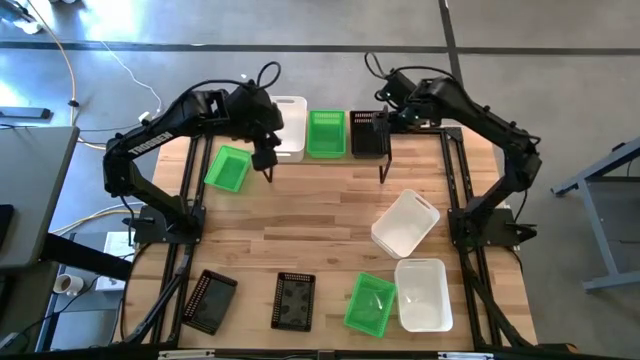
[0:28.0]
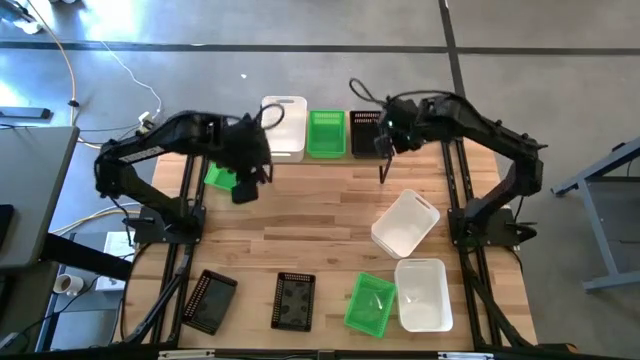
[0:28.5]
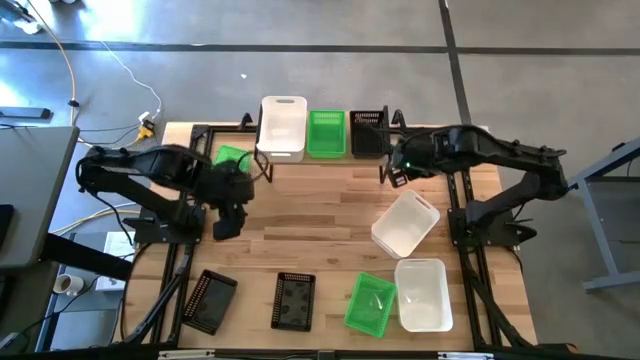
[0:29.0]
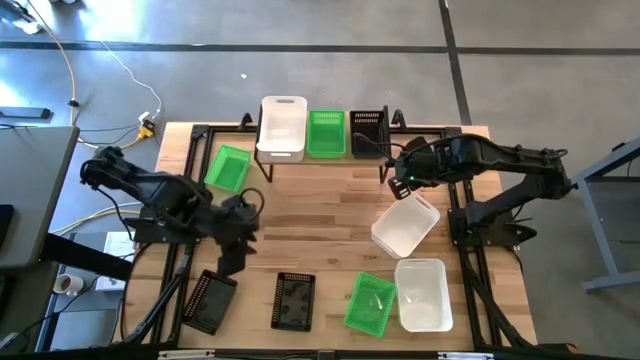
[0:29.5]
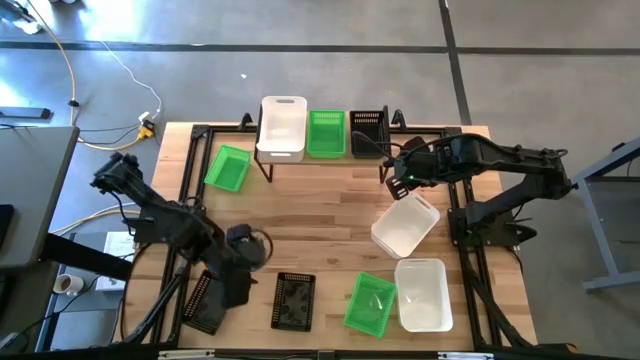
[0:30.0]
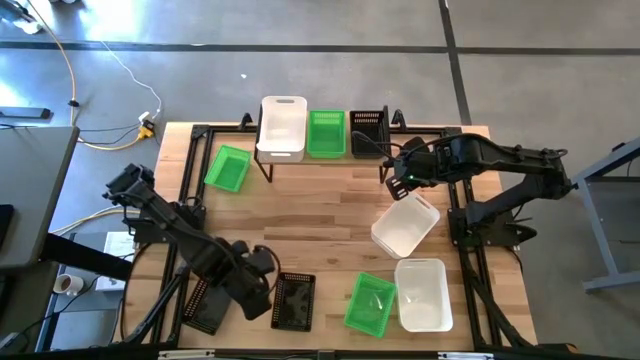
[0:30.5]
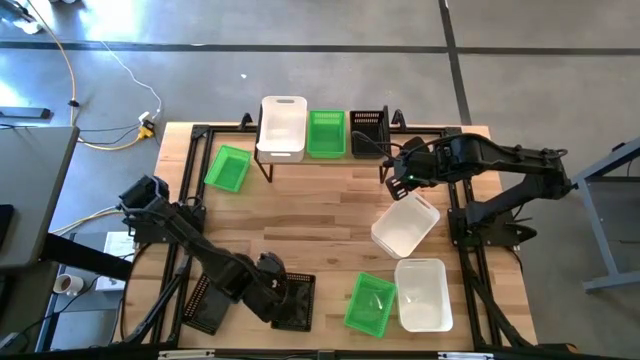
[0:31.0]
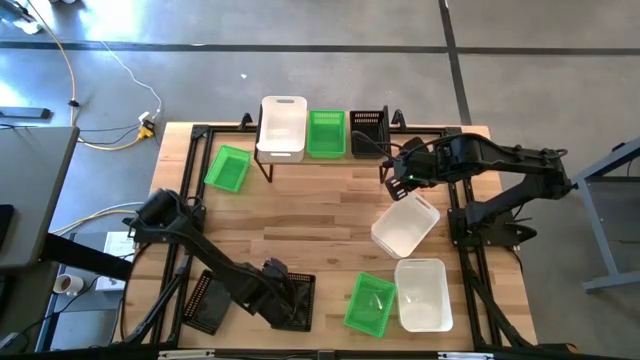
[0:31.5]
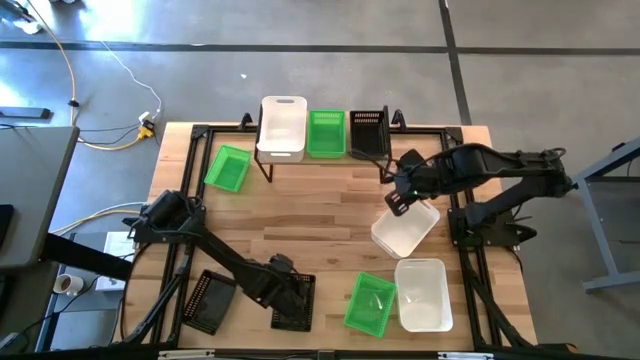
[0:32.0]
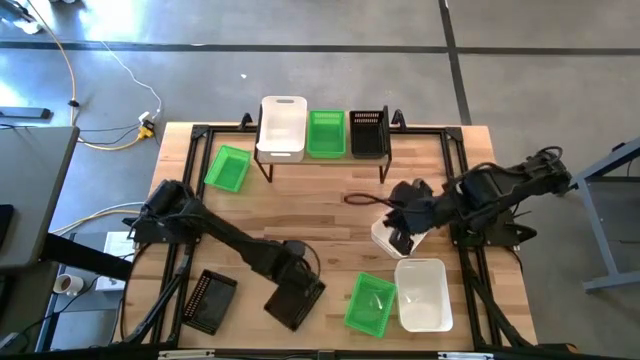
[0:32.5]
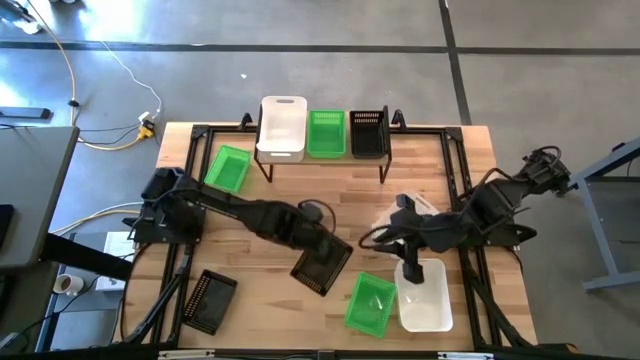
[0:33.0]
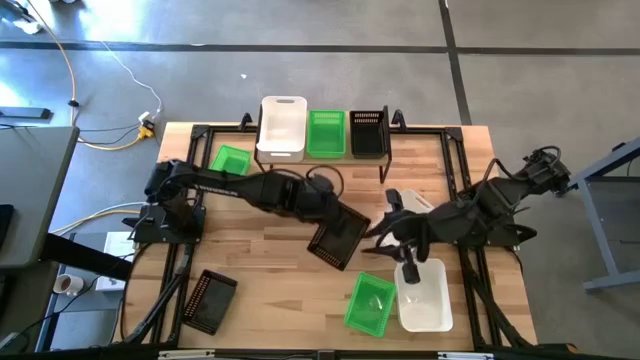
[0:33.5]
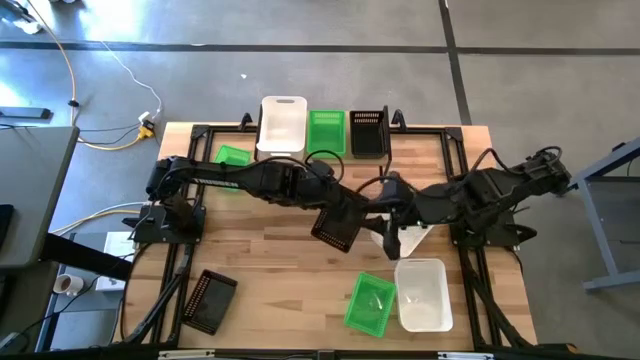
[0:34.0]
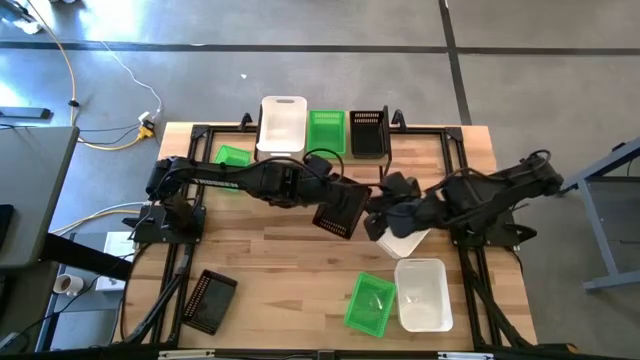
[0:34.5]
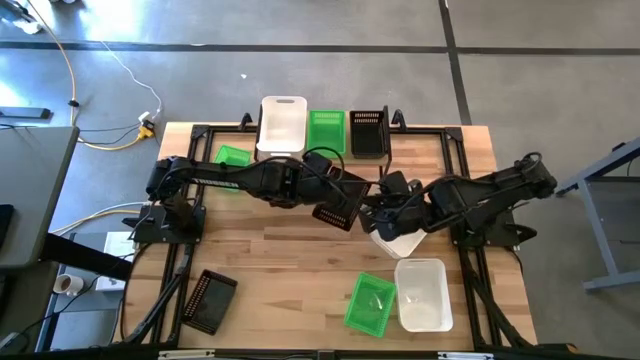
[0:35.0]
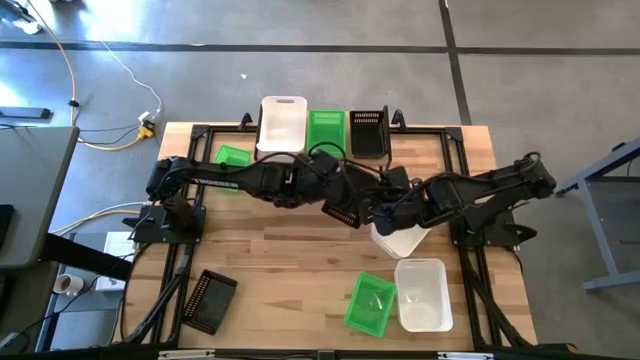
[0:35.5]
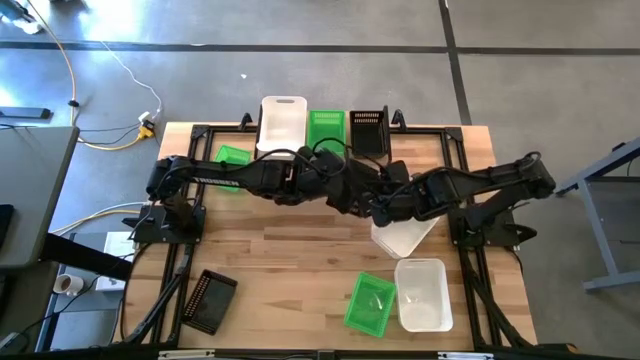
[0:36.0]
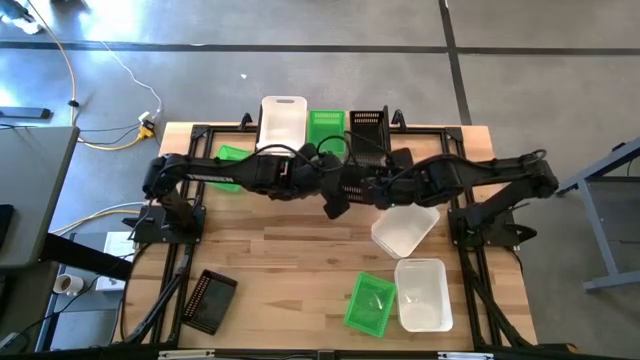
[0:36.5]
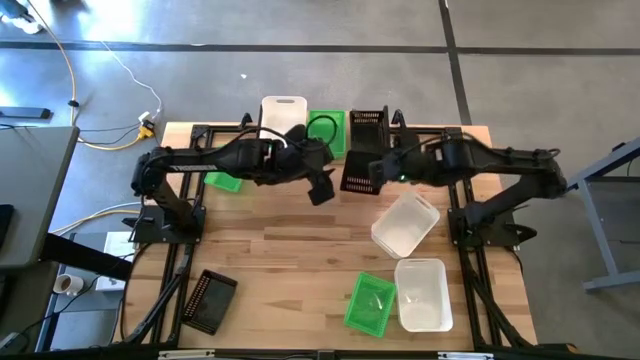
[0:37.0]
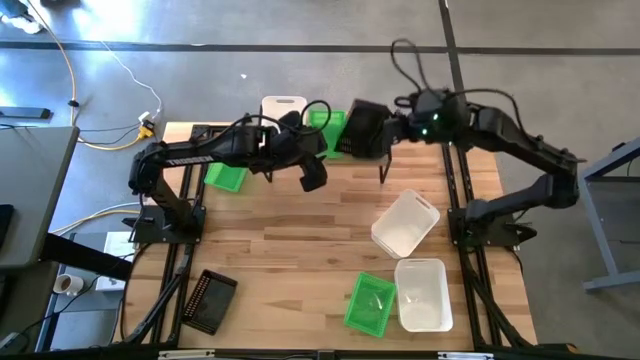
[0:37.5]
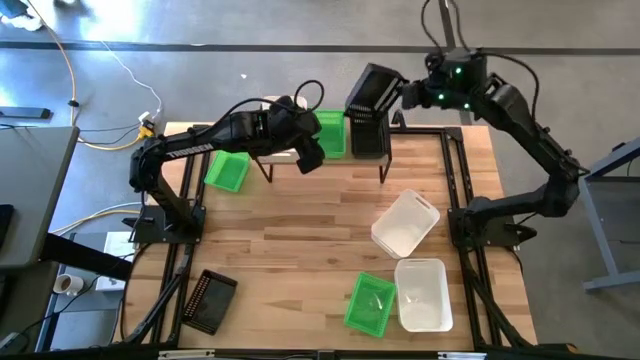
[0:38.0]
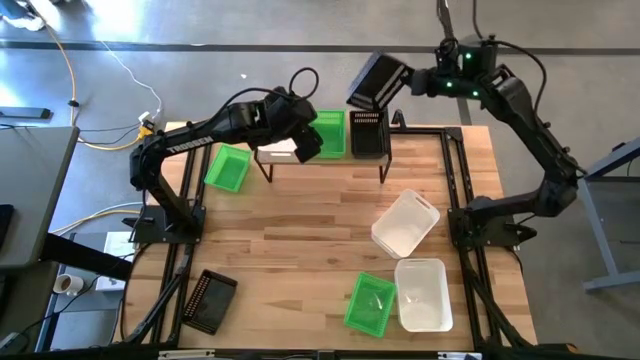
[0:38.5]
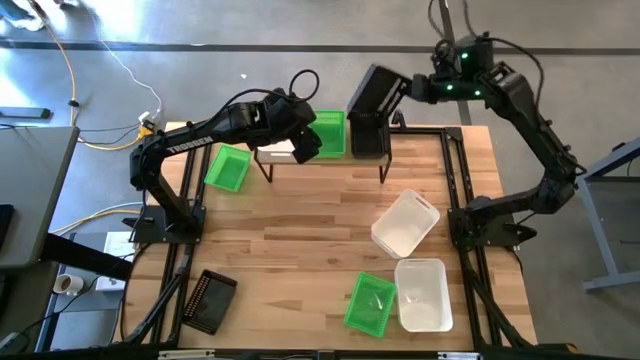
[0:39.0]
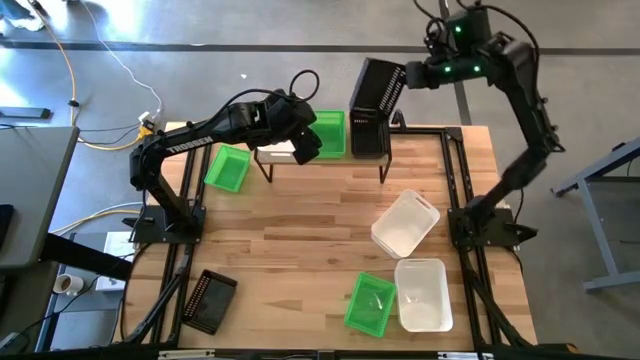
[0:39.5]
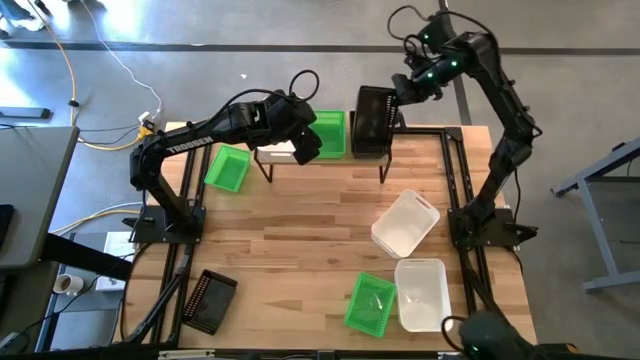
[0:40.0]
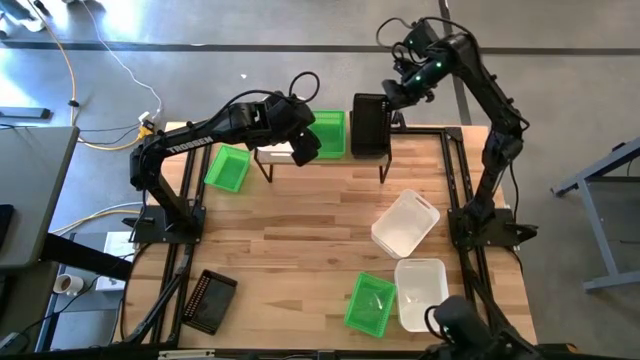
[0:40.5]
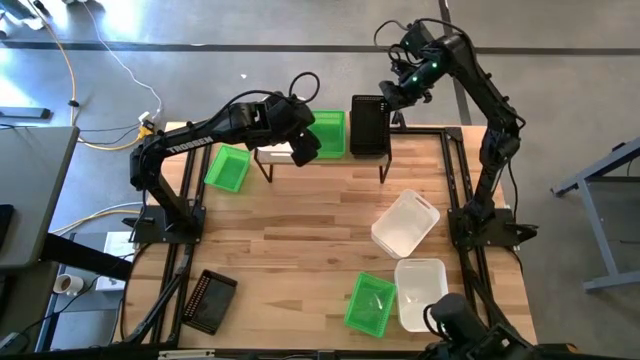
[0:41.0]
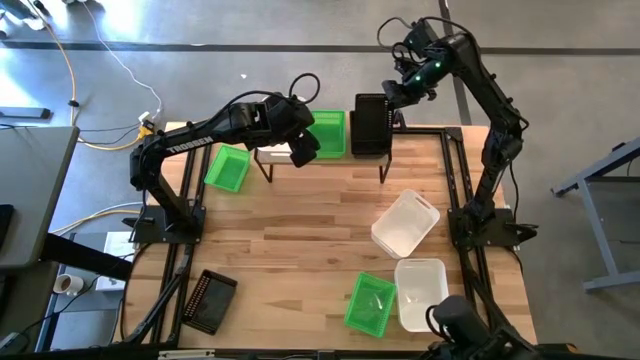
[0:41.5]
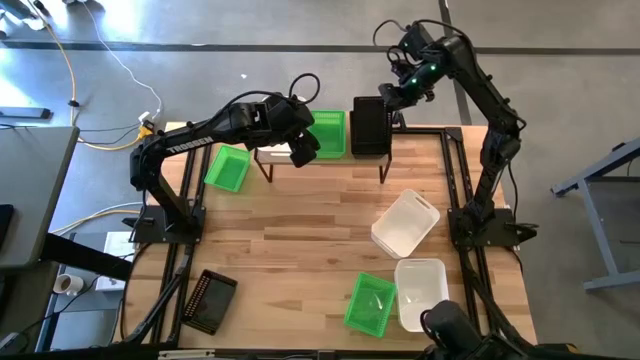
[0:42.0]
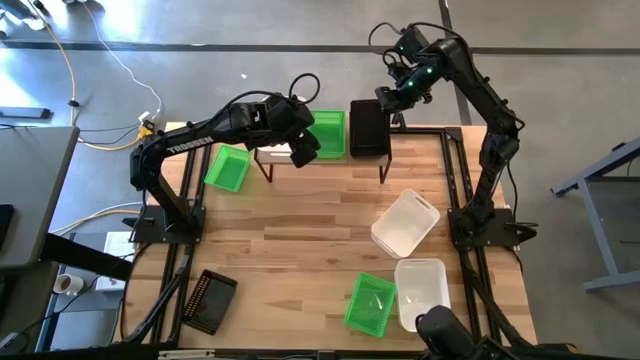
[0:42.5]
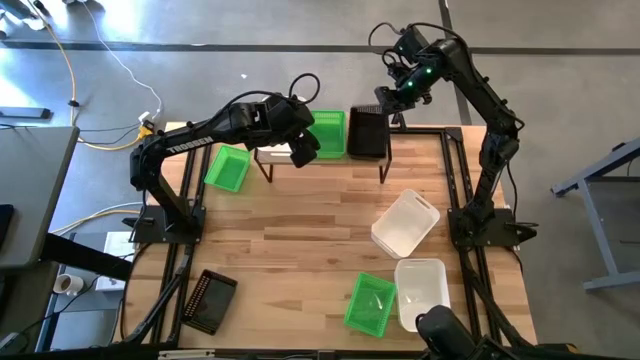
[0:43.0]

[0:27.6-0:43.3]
Task: Stack baskets on shelf by color
Stack the right black bin on top of the black bin

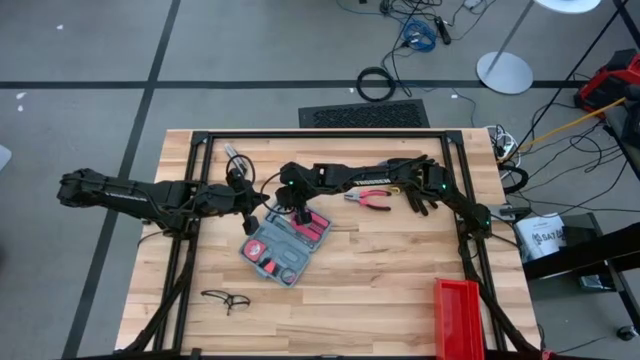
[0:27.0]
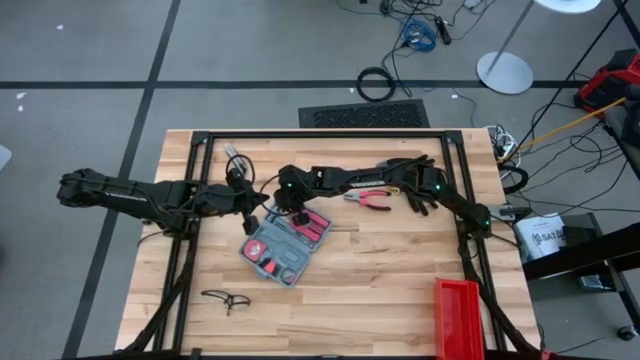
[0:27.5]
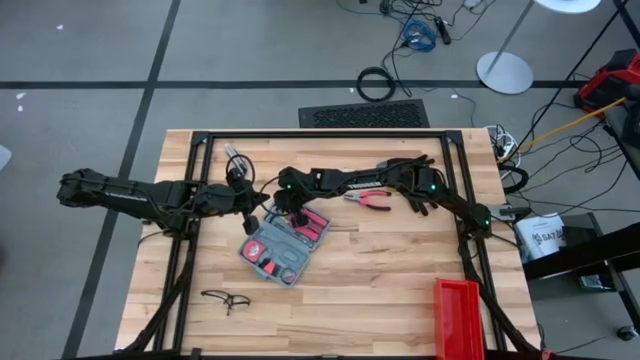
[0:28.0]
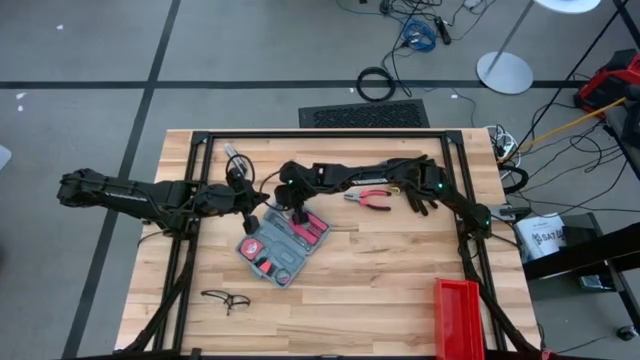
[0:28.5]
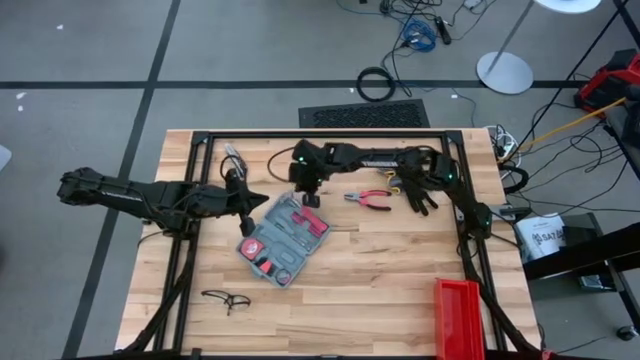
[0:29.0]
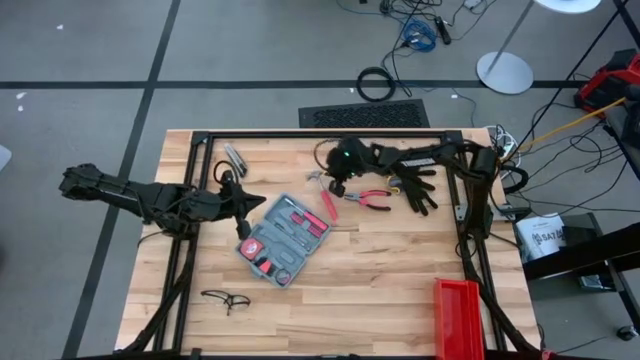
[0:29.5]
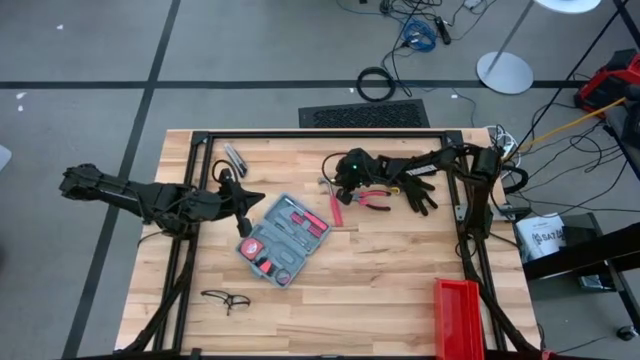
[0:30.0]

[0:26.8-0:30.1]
Task: prefit tool cases
Remove the pink hammer from the gray prefit tool case

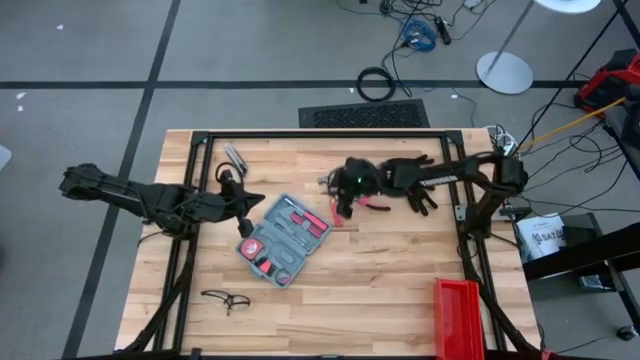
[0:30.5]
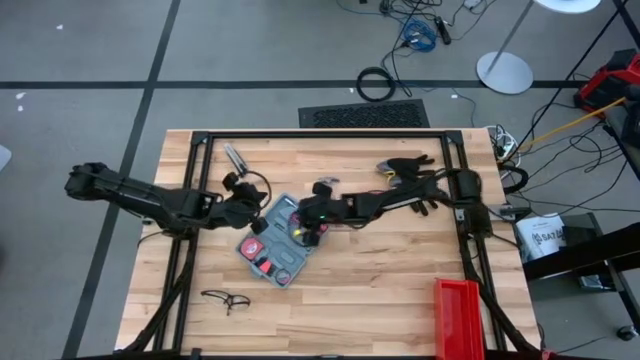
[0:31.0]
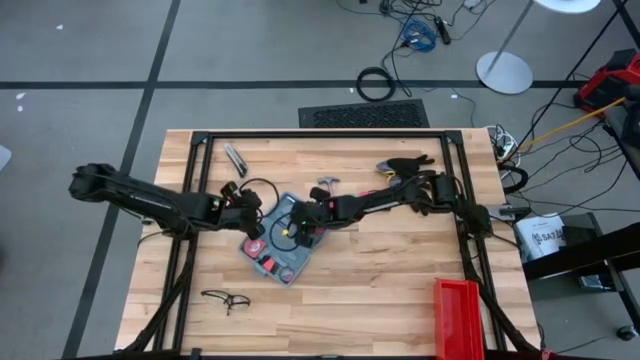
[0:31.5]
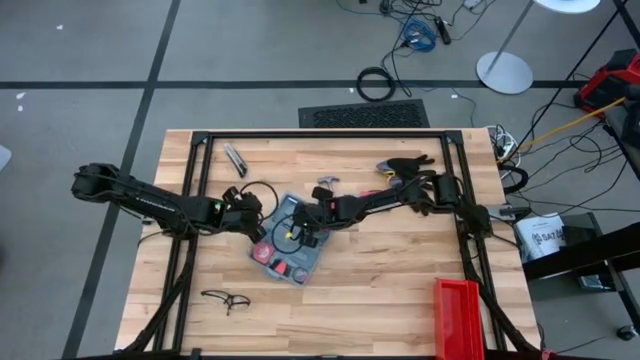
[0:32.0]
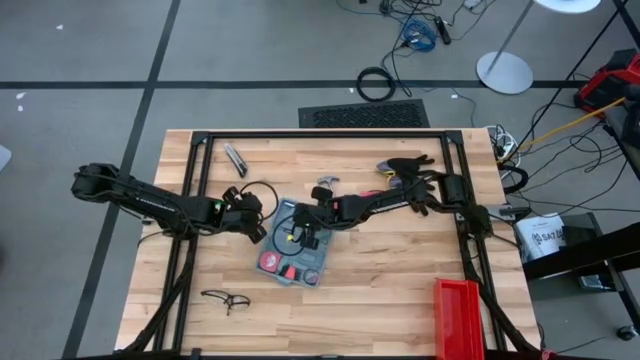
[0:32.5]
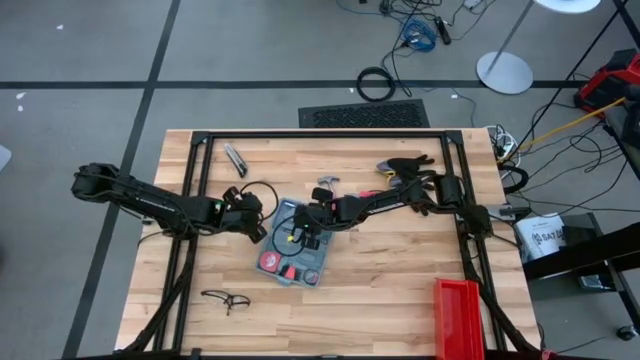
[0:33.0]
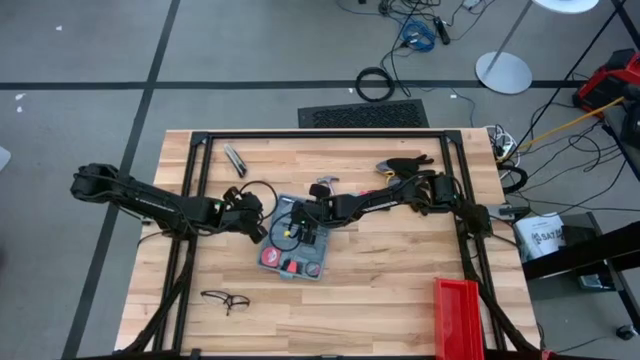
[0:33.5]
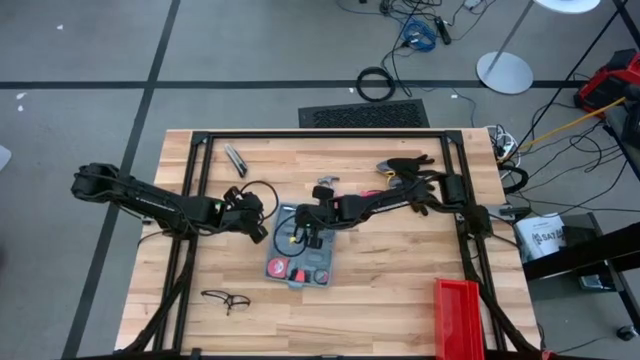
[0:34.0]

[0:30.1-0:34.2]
Remove the left pink terminal block from the gray prefit tool case
